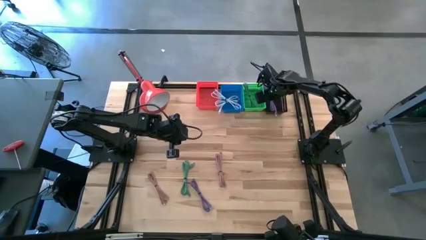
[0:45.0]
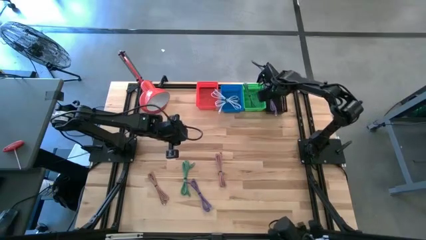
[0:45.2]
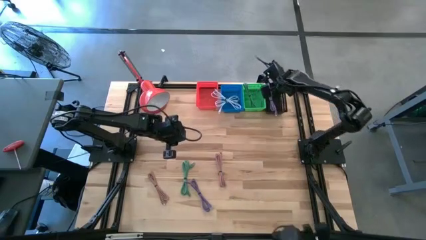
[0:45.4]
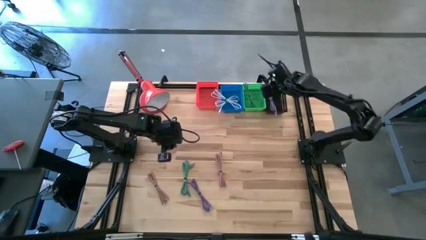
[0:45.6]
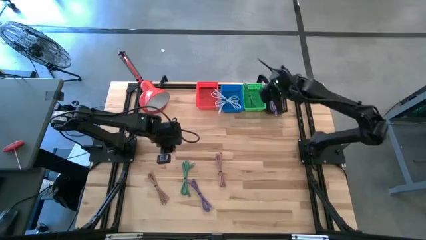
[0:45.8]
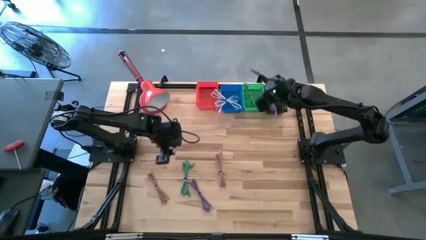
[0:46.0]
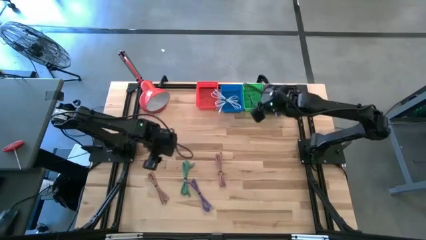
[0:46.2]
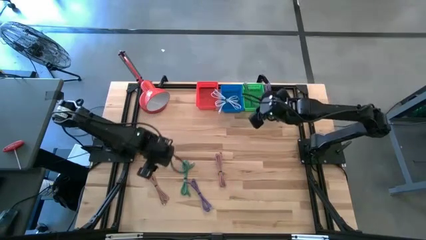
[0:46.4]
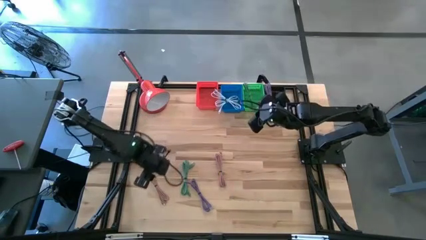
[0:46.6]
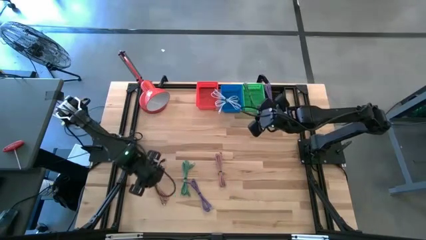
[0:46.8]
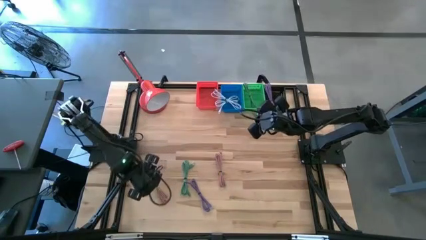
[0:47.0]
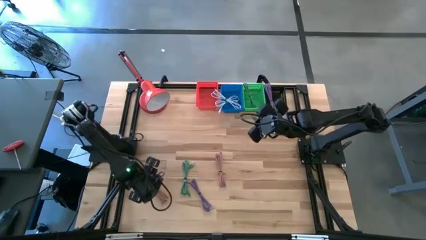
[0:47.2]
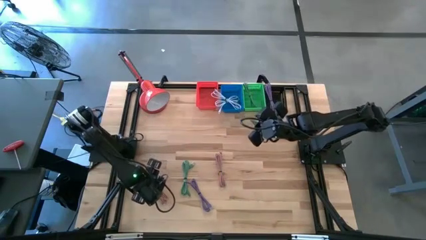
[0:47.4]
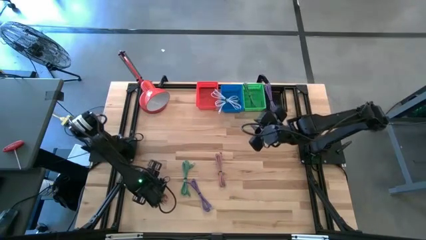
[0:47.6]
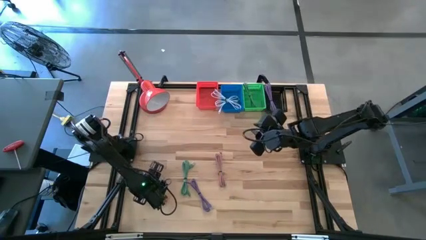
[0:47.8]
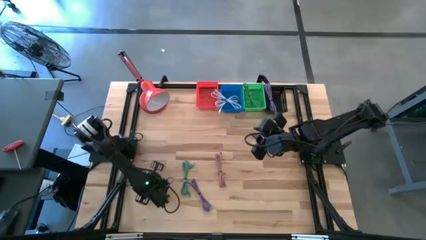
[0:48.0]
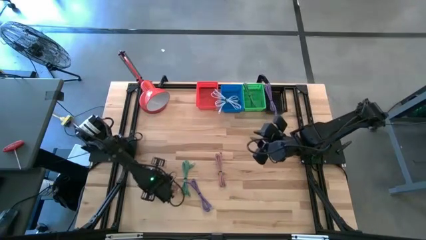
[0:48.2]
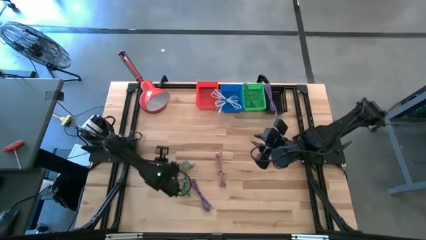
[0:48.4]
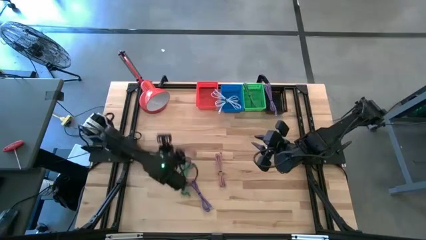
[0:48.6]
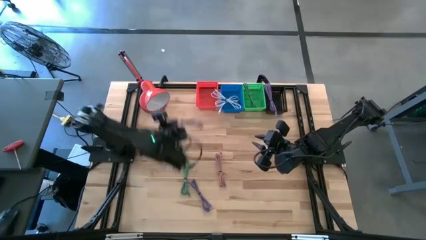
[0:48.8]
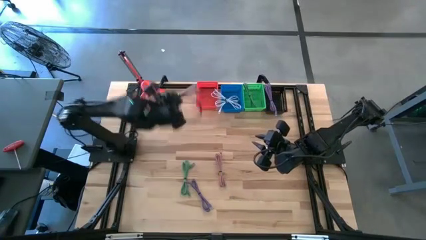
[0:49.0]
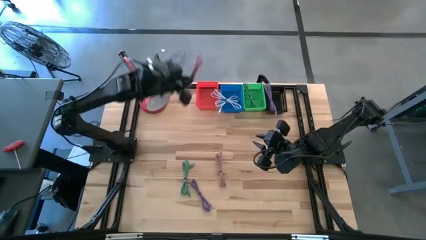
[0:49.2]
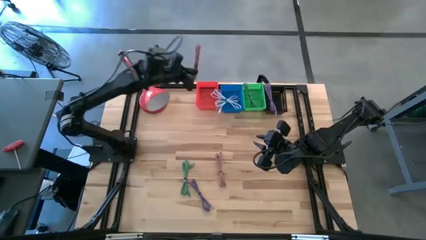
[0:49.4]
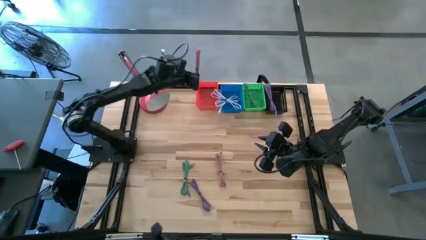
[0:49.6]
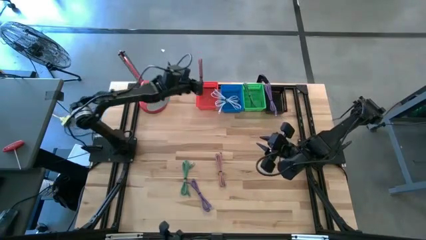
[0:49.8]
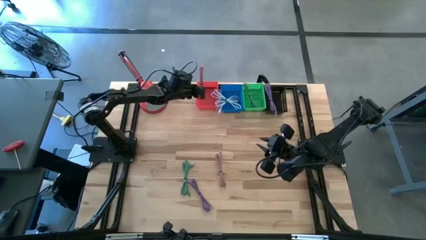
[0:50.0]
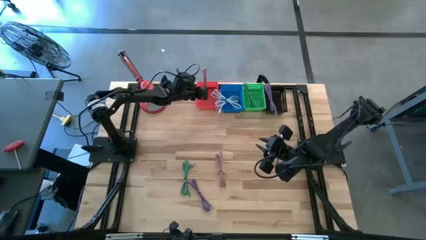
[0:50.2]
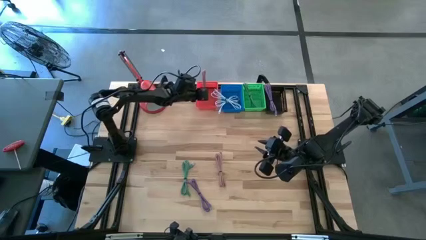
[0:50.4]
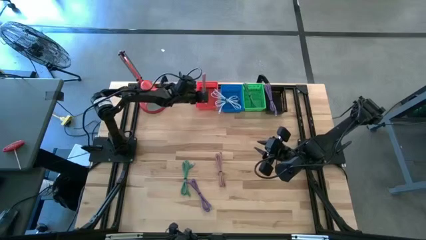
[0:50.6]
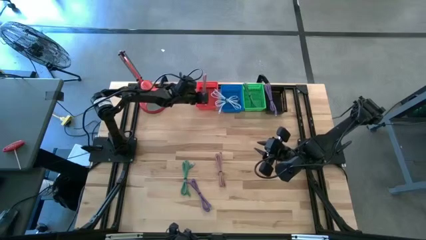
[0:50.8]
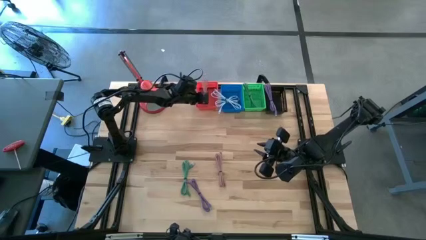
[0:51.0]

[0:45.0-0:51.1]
Task: Pick & Place USB Port
Put the left pink charger cable into the orange bin

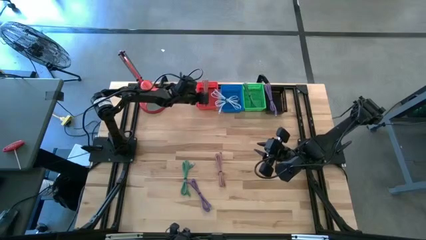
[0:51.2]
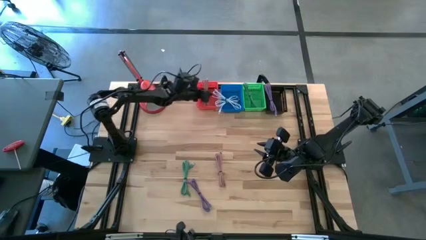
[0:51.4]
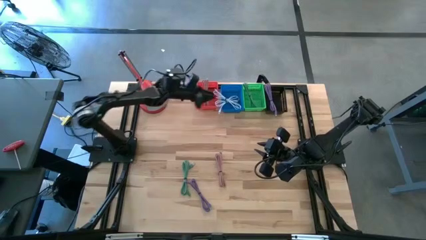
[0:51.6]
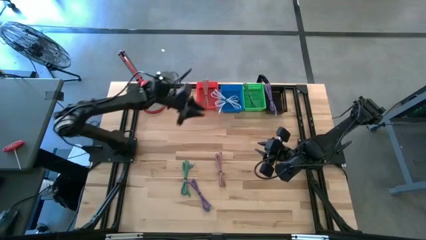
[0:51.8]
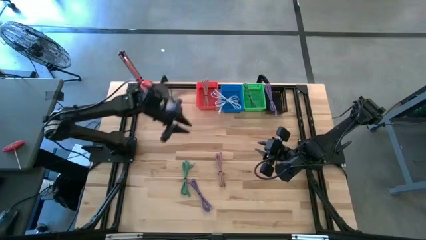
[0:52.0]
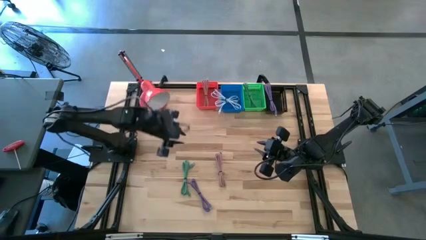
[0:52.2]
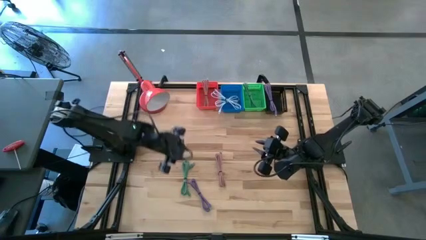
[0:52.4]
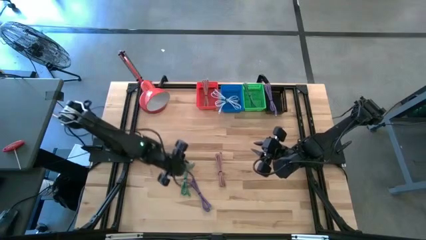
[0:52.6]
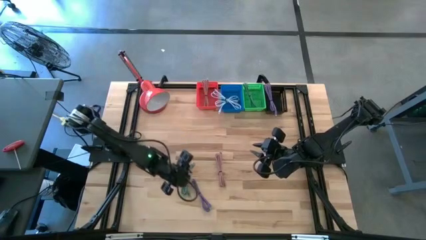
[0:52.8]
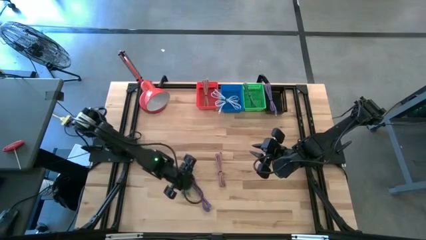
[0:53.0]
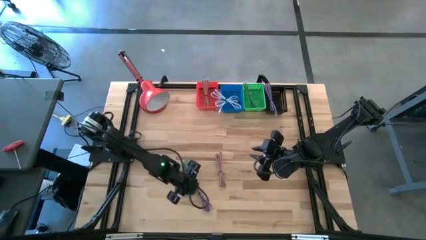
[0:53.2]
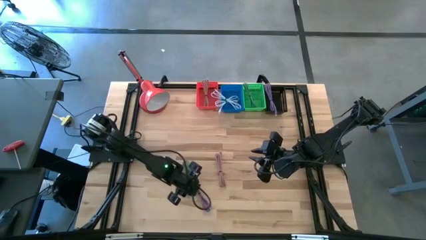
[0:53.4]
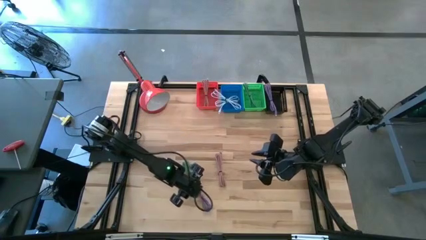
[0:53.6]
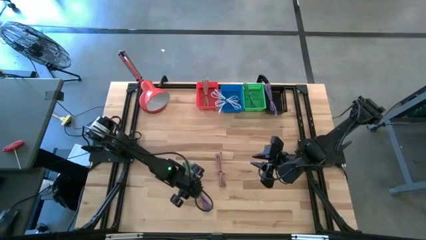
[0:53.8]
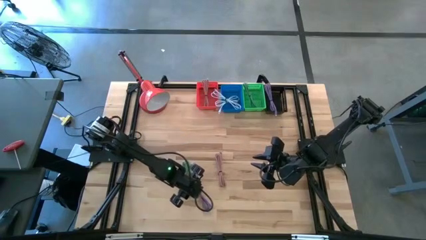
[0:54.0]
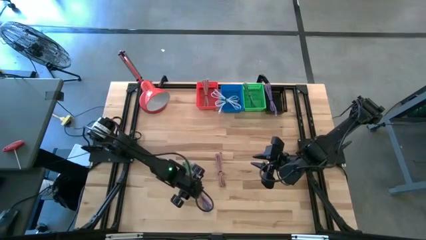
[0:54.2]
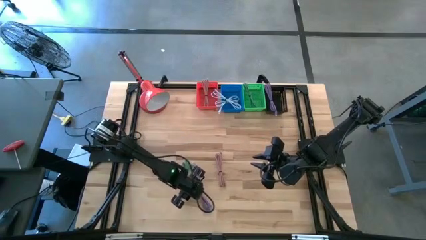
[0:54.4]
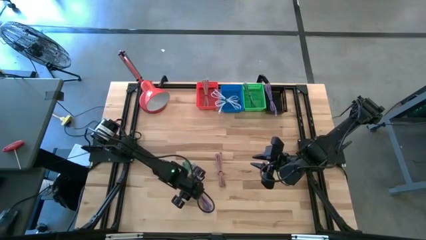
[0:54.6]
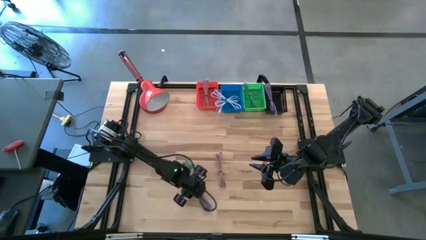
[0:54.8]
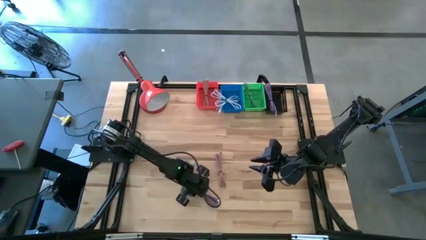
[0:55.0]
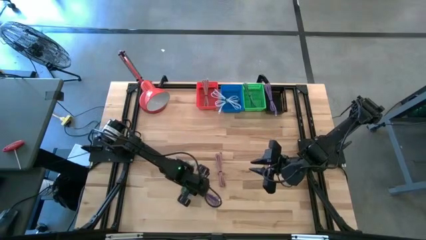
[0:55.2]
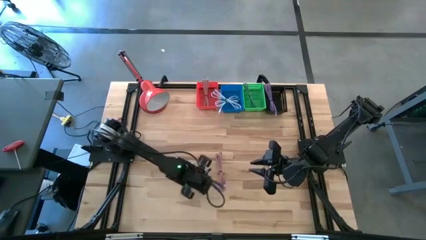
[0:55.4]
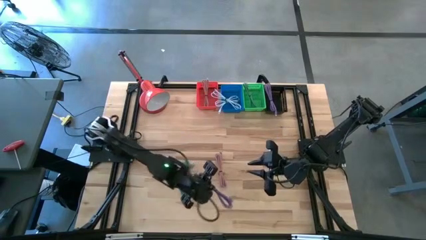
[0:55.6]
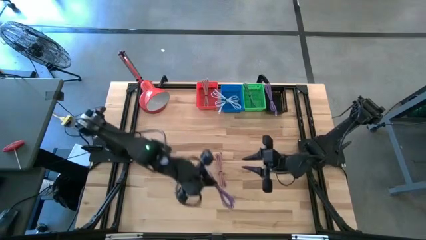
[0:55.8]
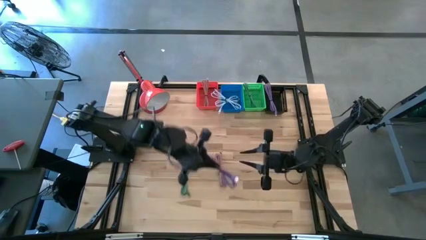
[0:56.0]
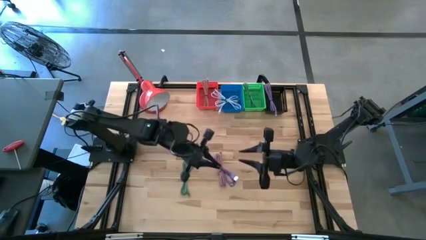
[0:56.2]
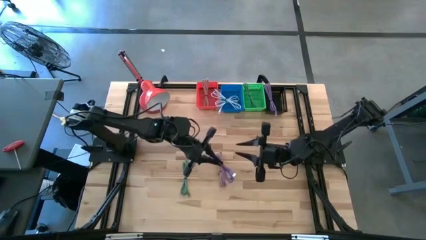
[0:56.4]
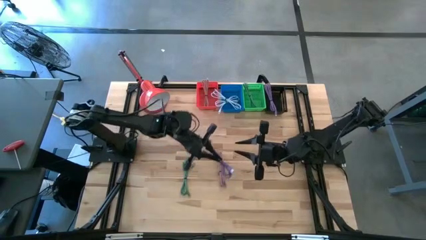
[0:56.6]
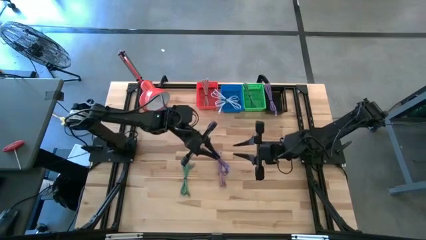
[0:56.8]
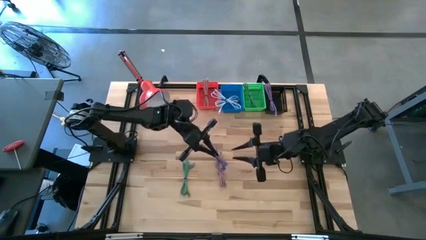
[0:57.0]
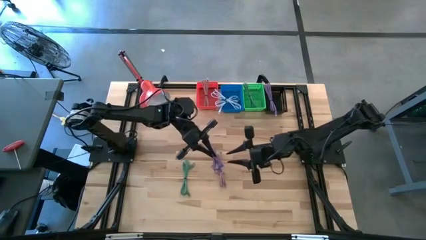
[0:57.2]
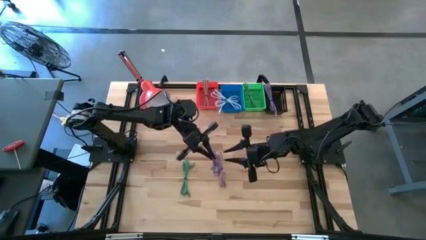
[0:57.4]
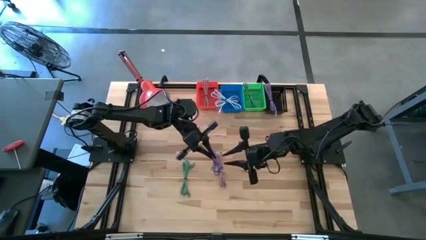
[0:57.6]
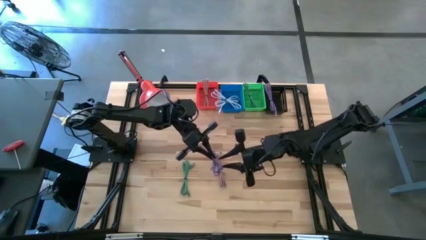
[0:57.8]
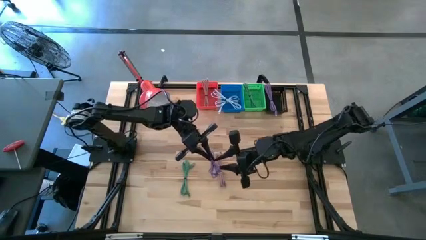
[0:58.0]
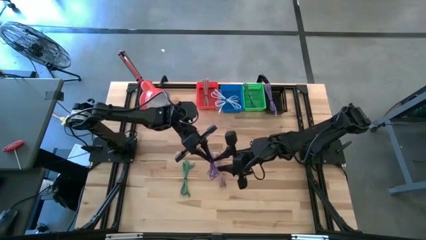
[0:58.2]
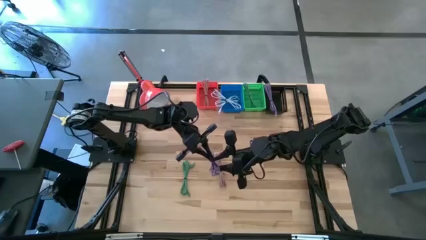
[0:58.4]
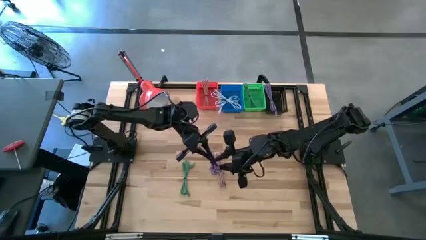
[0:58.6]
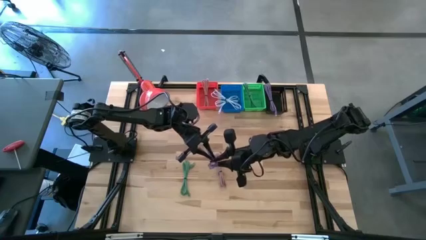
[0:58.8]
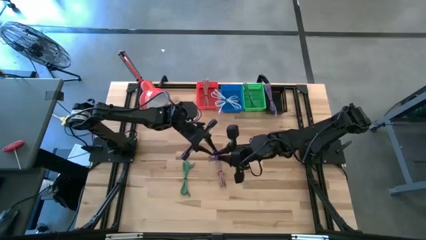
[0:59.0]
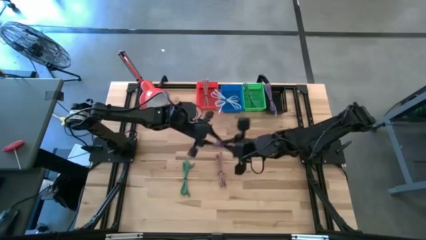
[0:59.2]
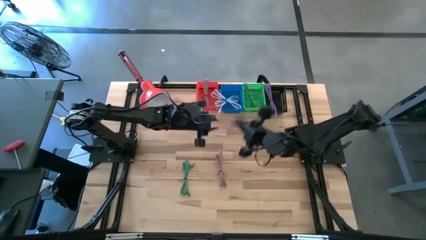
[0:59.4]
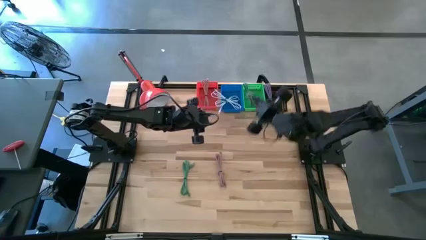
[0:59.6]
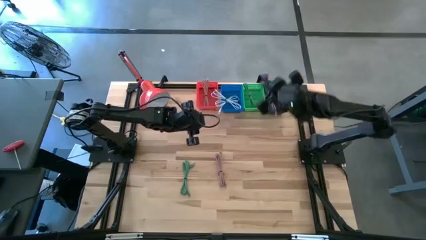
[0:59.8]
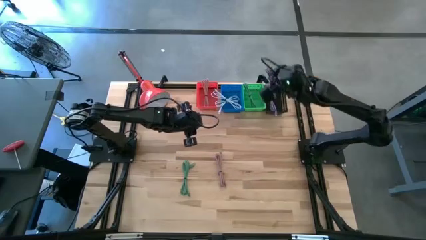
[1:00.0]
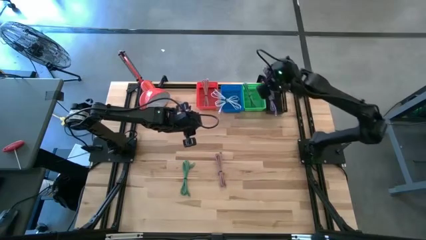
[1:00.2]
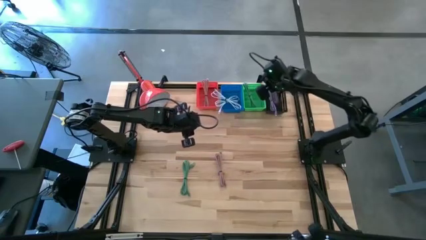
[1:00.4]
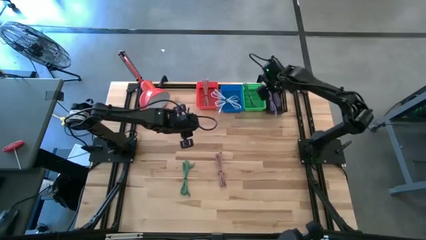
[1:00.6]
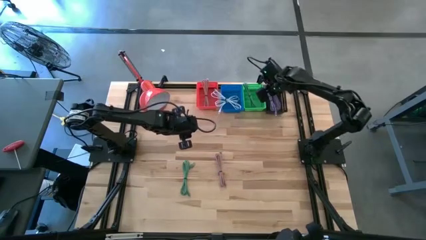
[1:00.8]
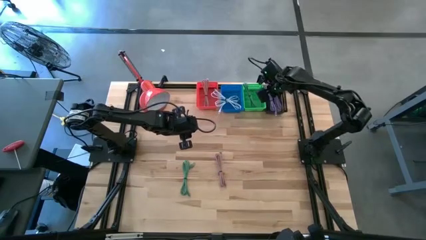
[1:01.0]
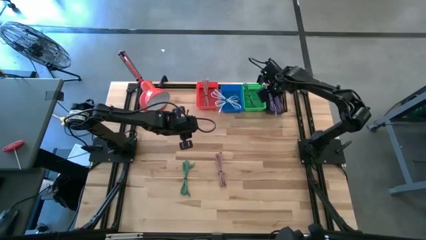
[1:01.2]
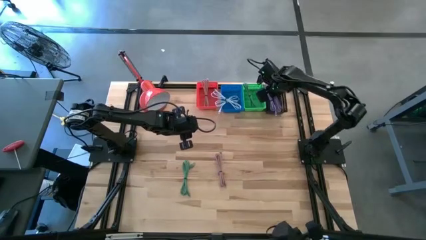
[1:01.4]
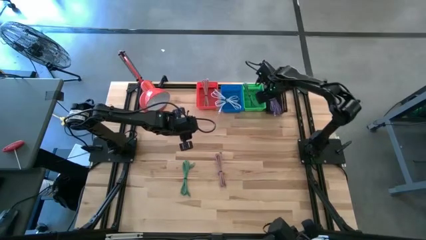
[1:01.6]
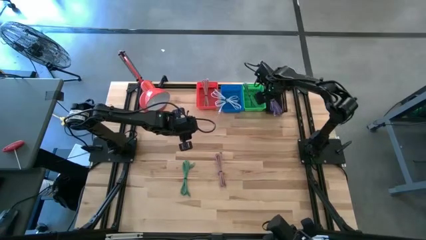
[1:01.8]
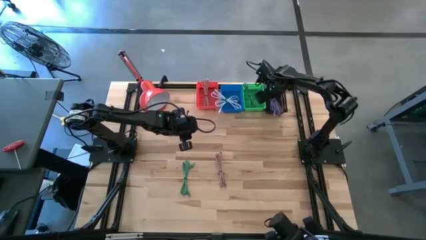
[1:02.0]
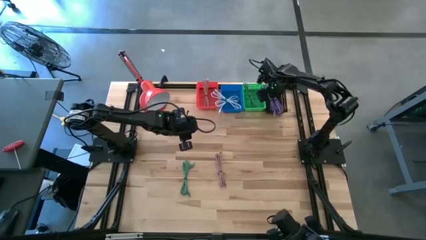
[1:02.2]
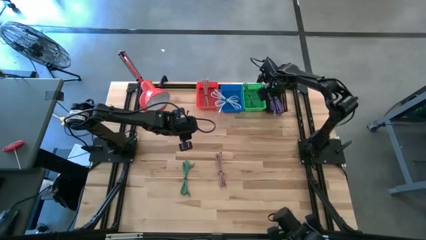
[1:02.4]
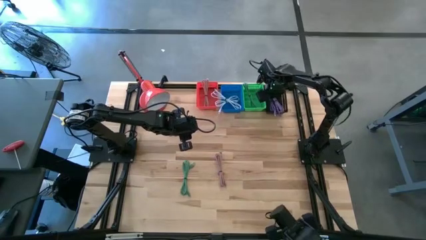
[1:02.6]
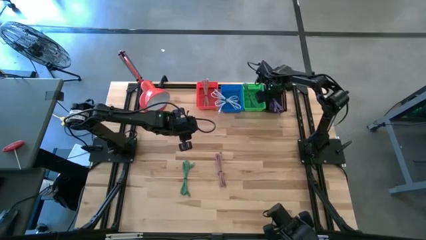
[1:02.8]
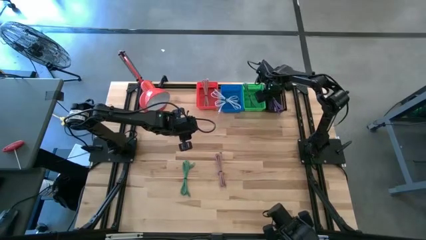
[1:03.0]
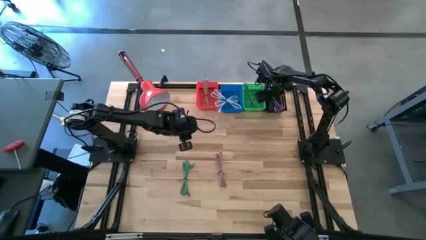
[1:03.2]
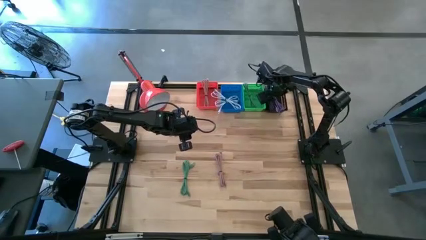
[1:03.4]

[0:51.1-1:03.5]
Put the purple charger cable into the black bin
